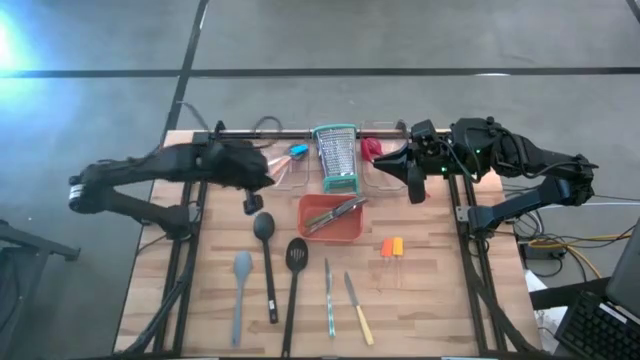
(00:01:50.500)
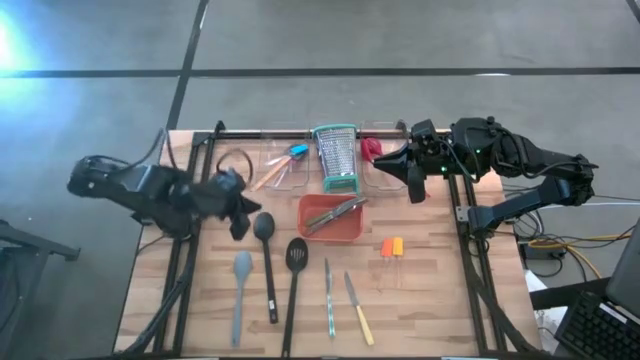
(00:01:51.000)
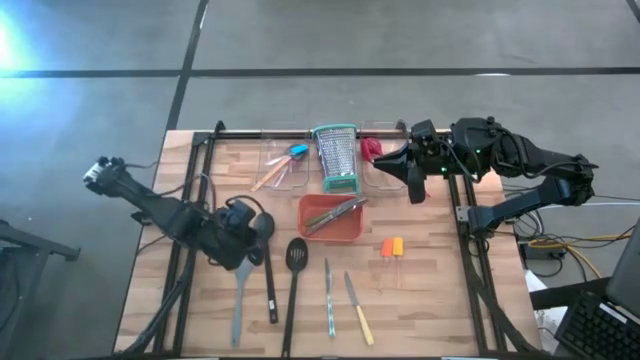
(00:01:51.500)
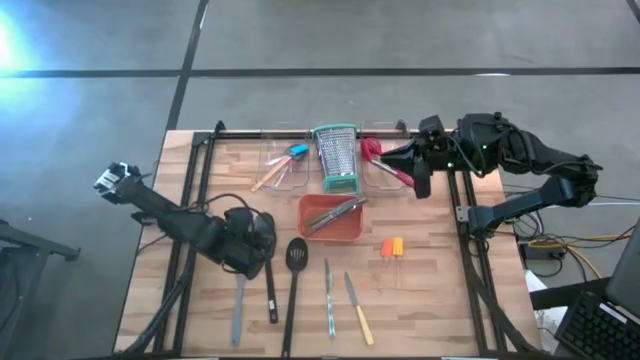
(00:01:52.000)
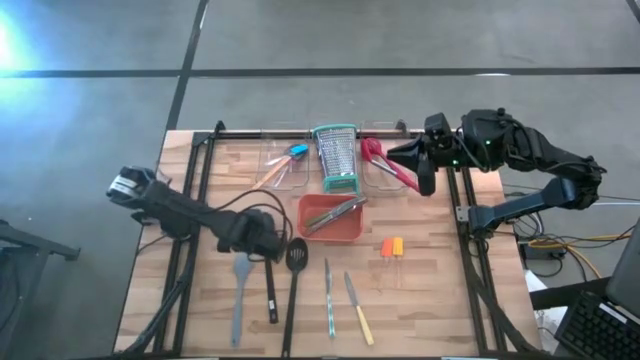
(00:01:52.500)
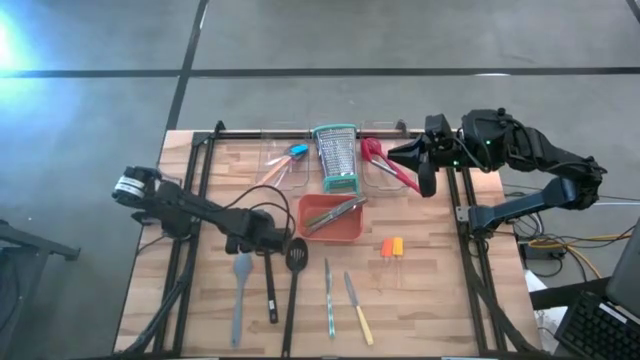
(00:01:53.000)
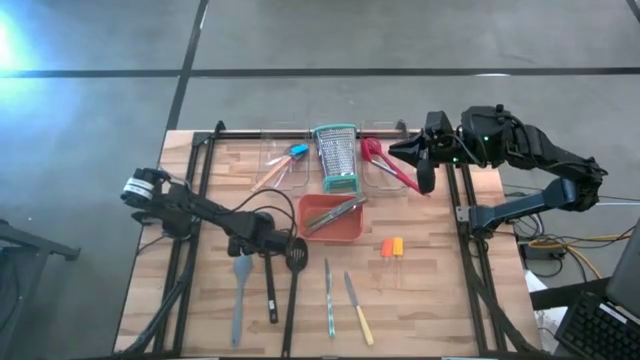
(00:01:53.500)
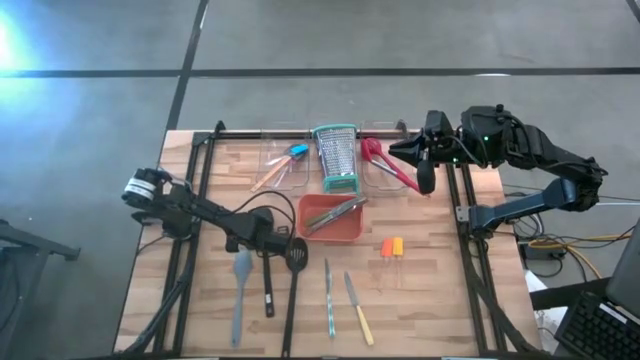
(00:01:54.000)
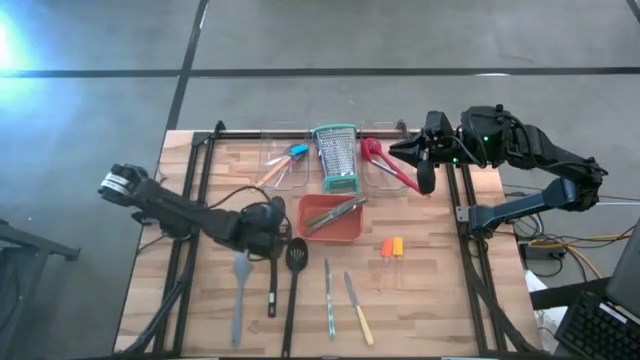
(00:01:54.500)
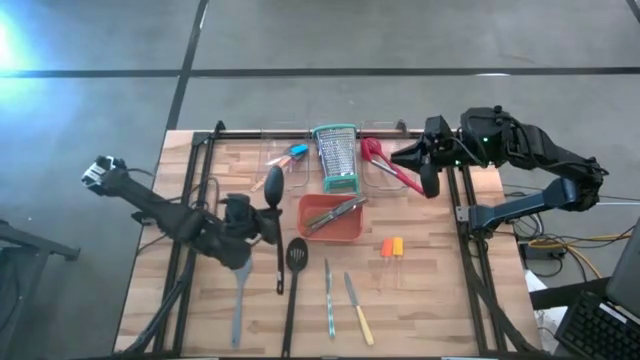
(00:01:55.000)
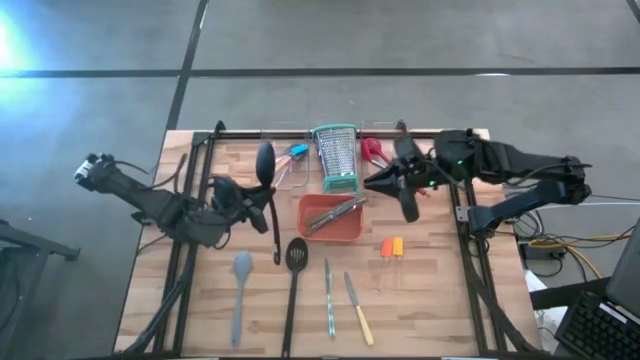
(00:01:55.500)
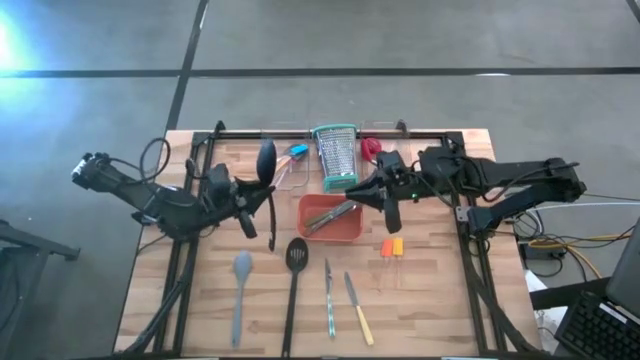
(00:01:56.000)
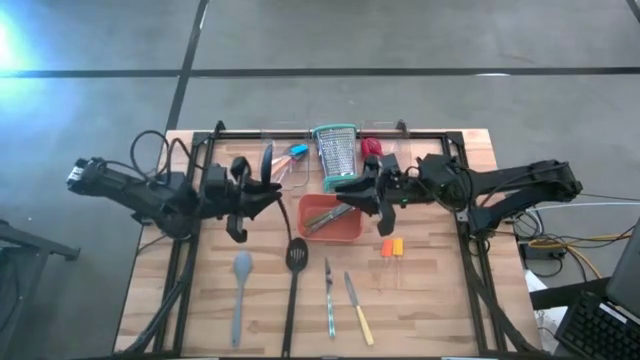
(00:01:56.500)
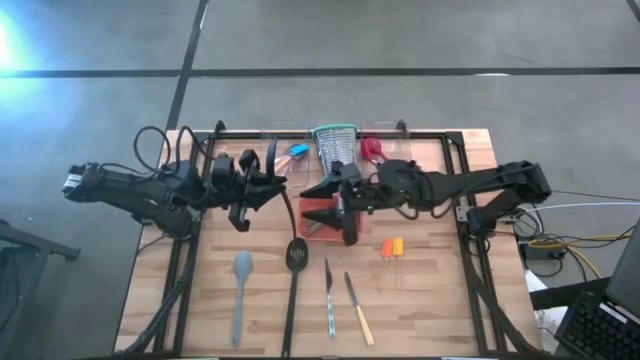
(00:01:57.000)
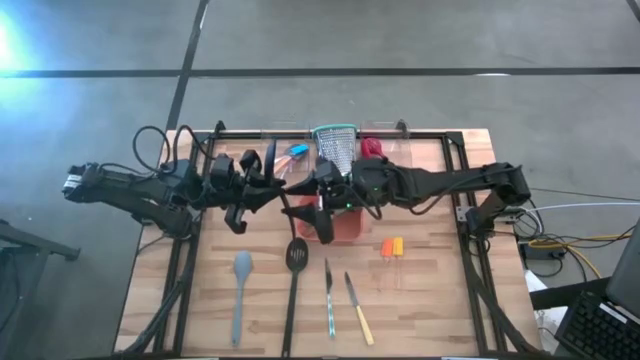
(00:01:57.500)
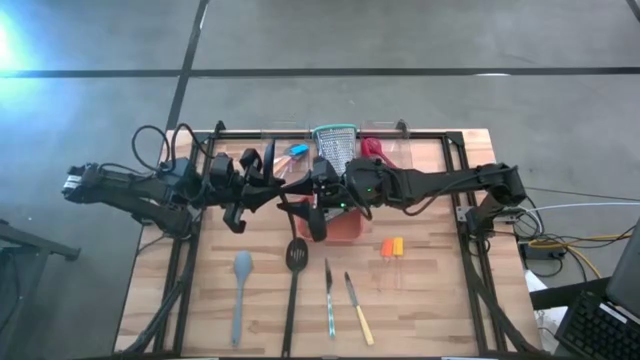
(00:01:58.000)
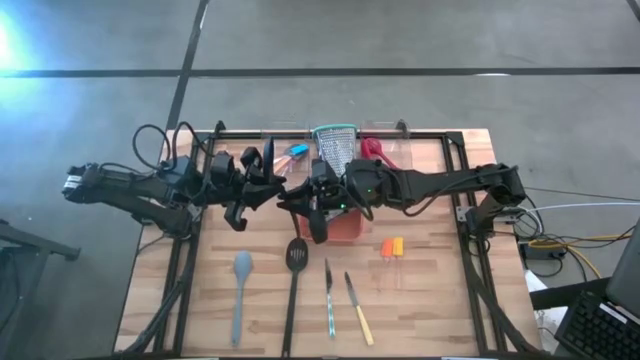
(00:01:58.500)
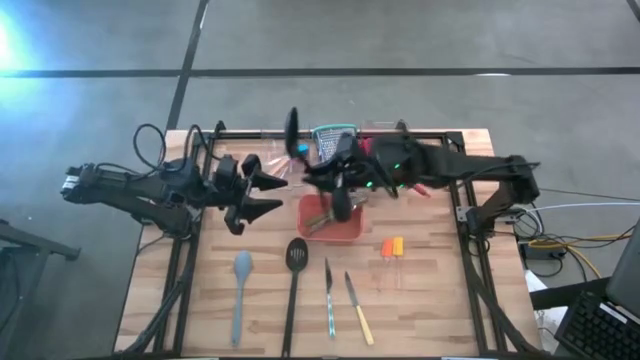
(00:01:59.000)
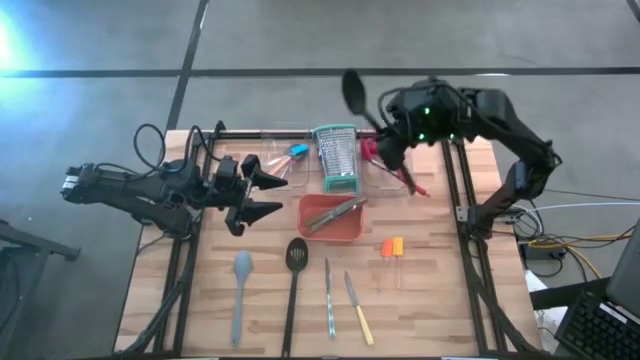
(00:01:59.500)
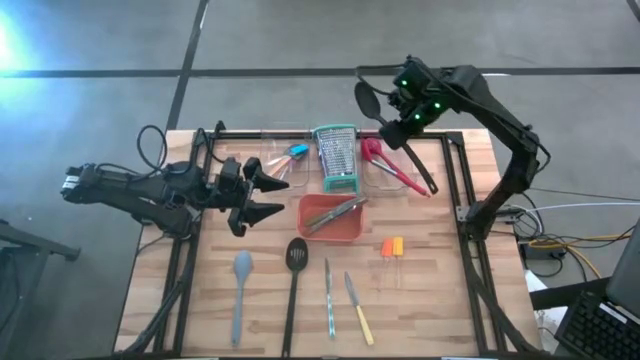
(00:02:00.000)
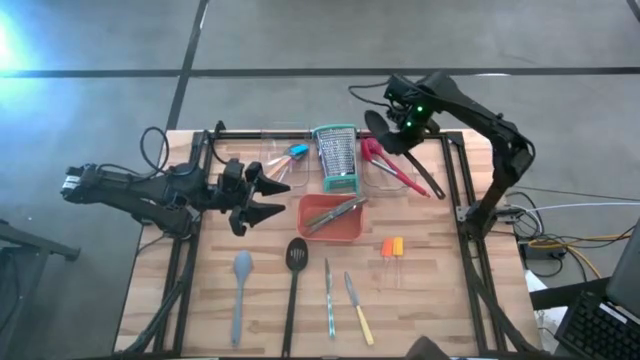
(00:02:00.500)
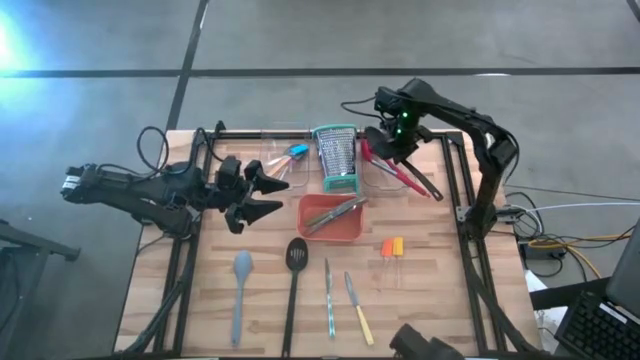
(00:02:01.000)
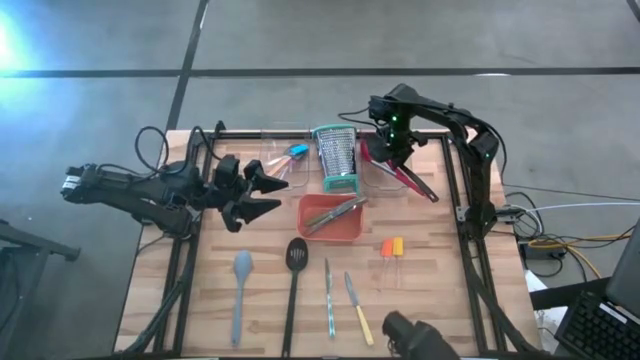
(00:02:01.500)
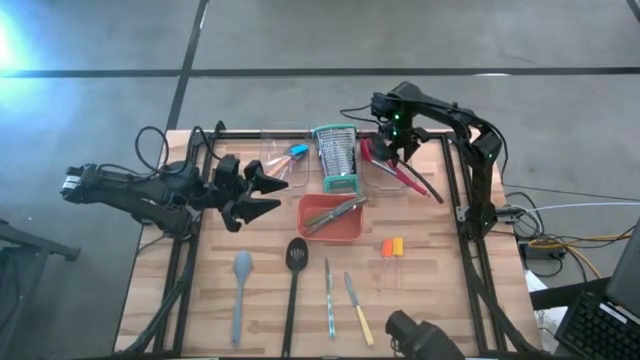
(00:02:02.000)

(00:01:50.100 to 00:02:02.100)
Task: Pick & Place Kitchen Items
Put the black serving spoon into the right transparent bin

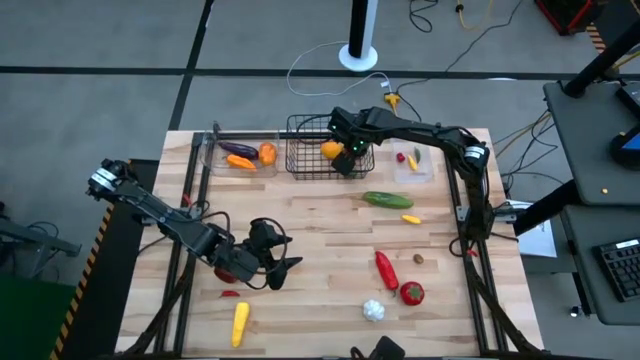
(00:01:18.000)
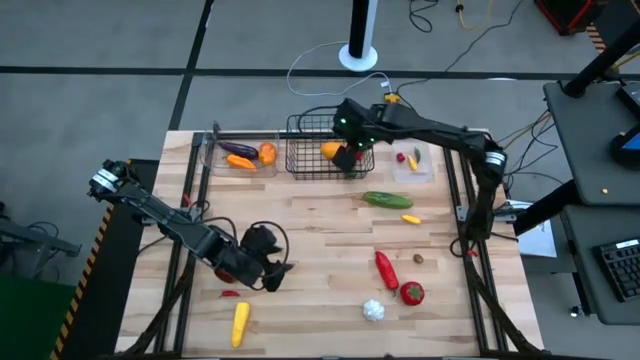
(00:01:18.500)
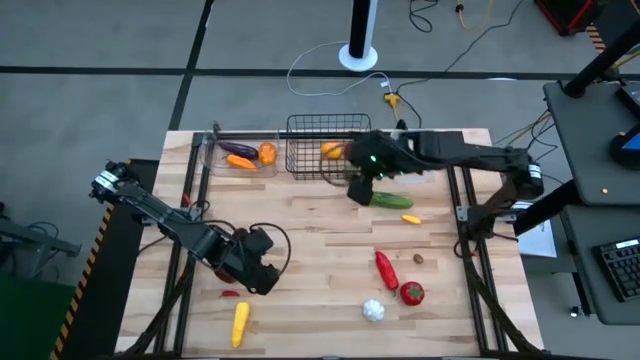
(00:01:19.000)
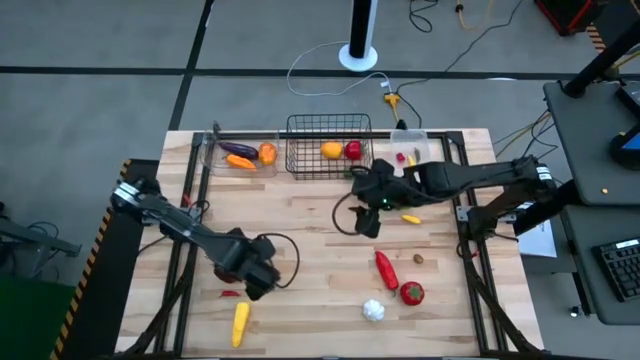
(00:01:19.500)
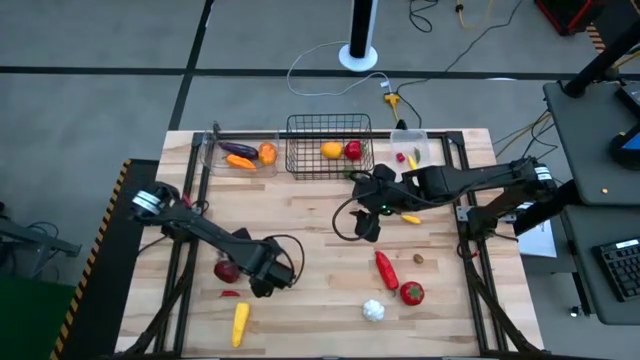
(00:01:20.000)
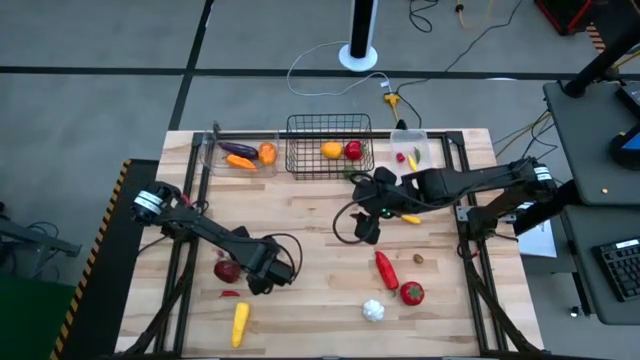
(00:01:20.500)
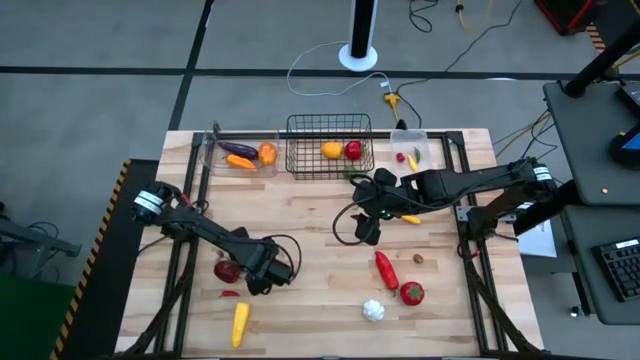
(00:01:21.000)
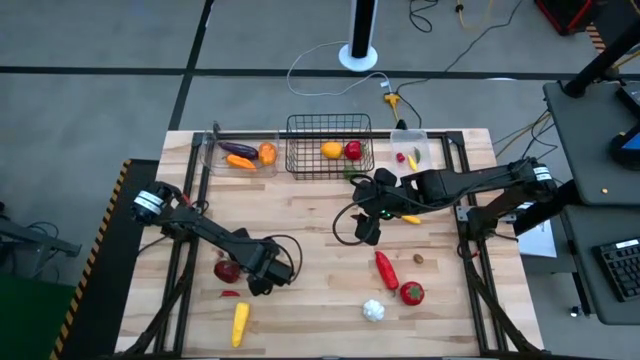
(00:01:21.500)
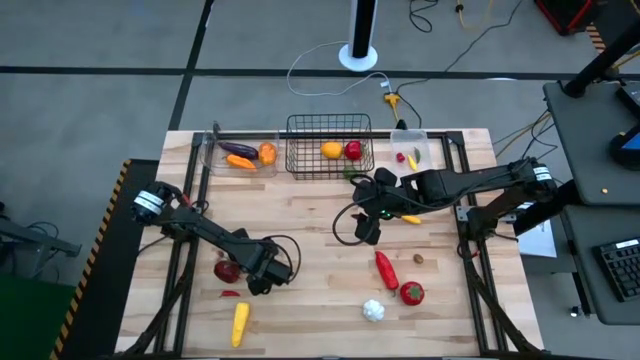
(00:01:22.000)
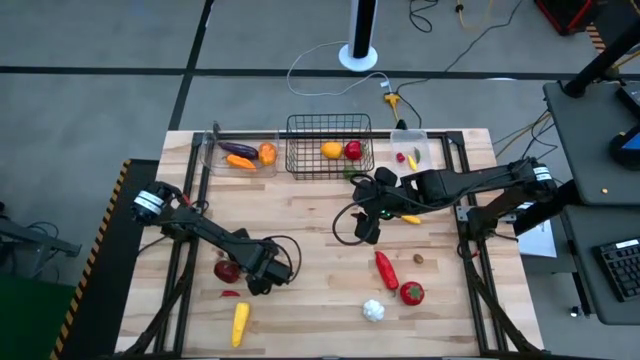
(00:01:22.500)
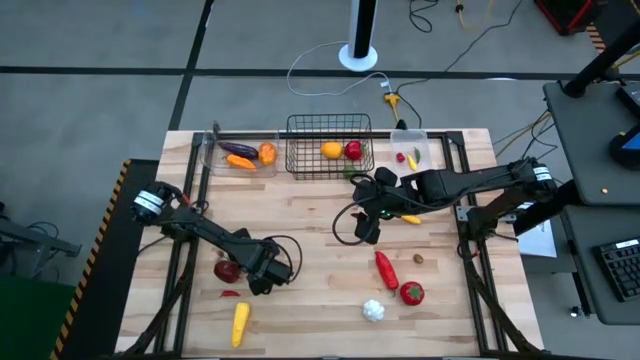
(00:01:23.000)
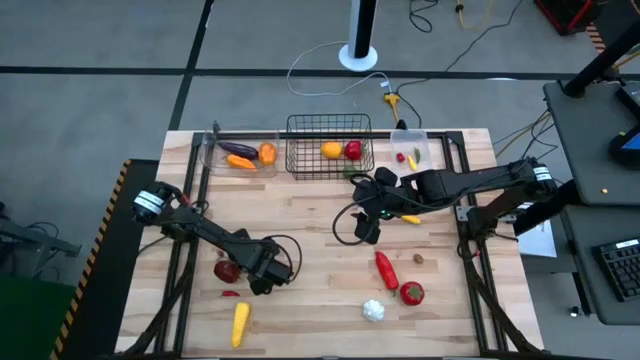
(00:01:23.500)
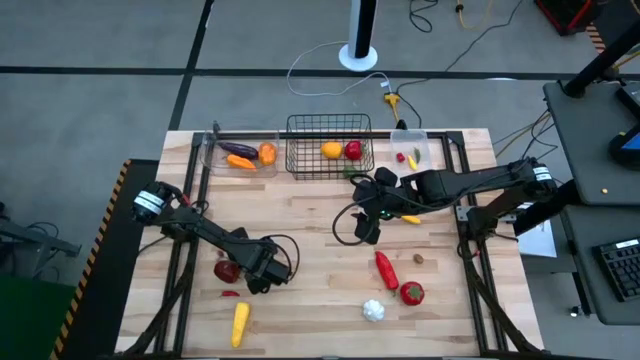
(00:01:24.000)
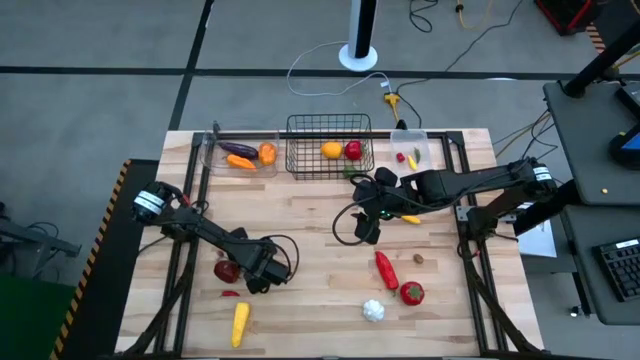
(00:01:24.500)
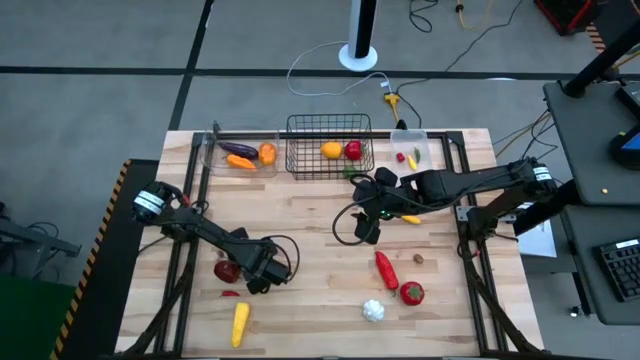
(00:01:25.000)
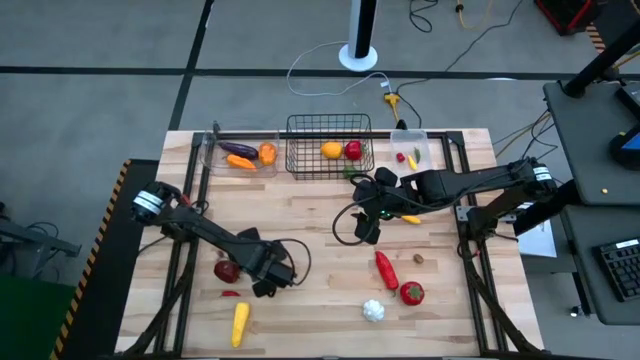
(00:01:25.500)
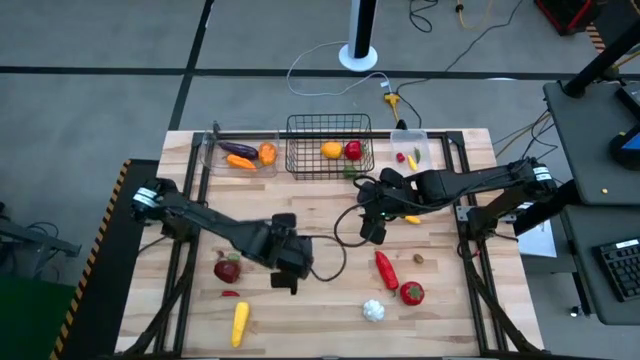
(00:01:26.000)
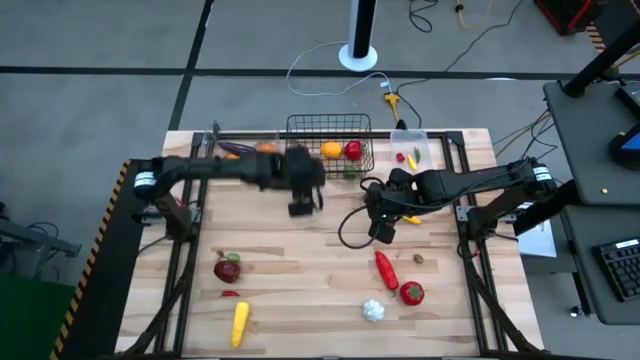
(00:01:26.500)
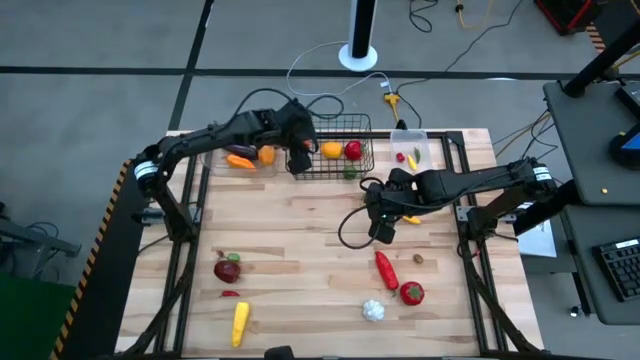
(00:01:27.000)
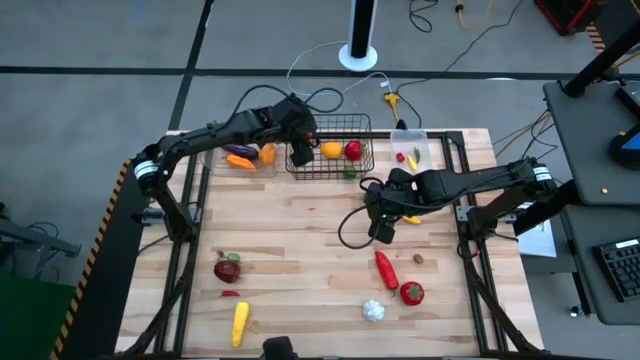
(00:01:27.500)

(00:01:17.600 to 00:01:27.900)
Task: Sort produce into baskets
Put the strawberry into the wire basket
